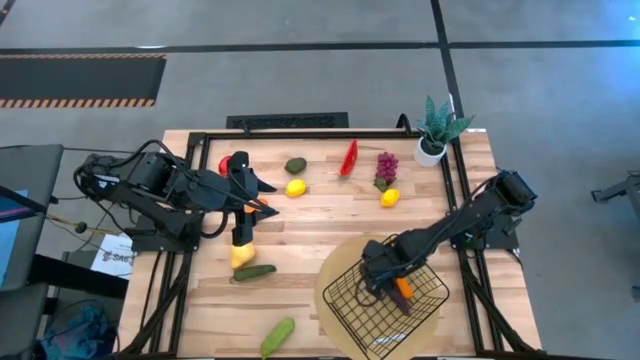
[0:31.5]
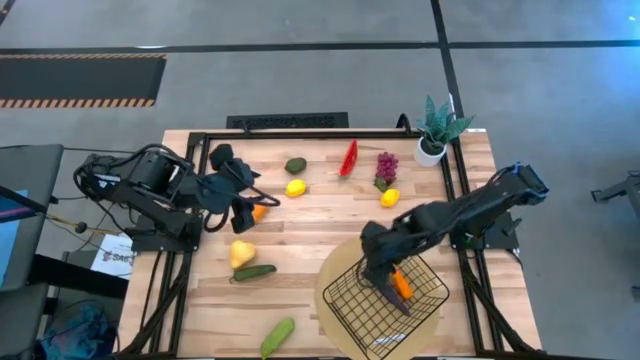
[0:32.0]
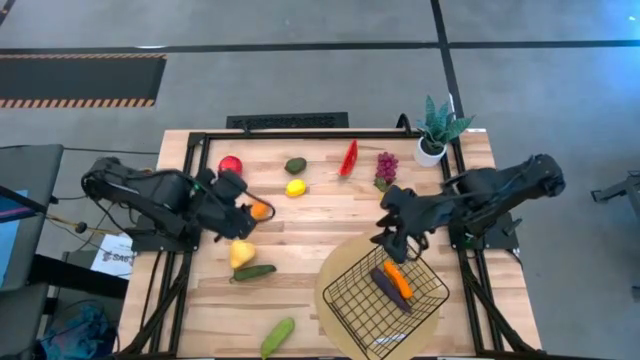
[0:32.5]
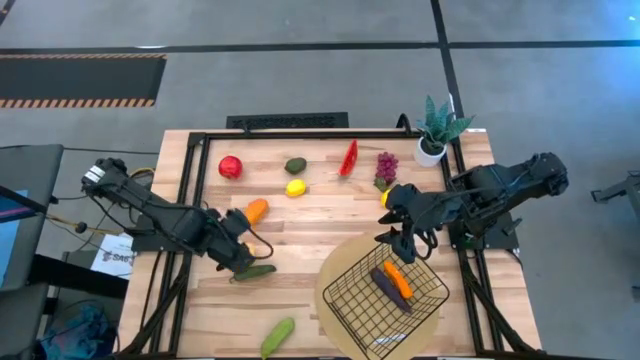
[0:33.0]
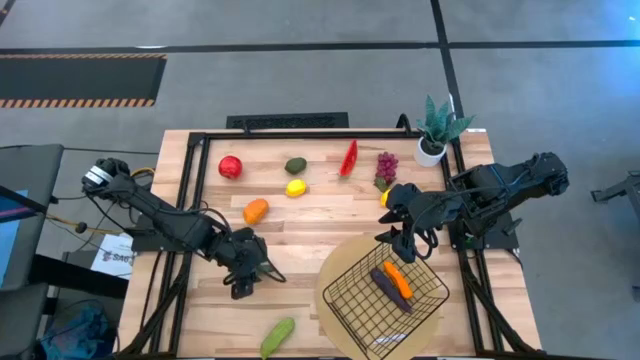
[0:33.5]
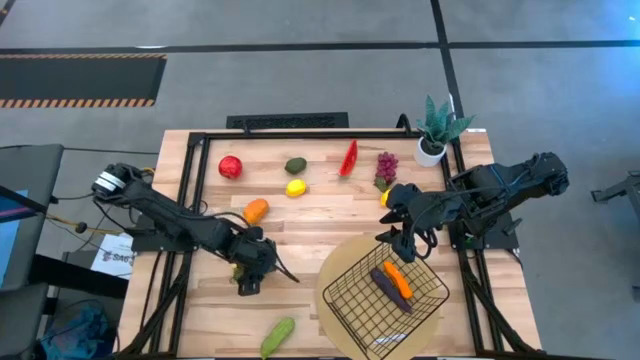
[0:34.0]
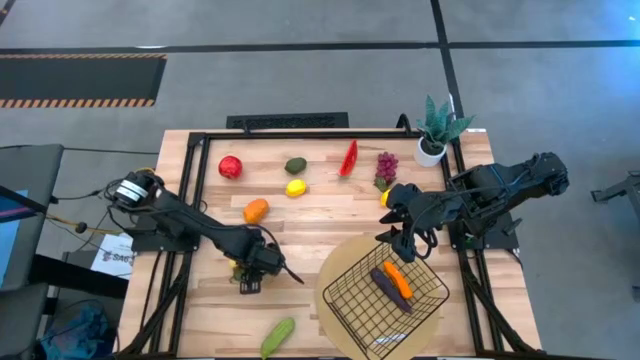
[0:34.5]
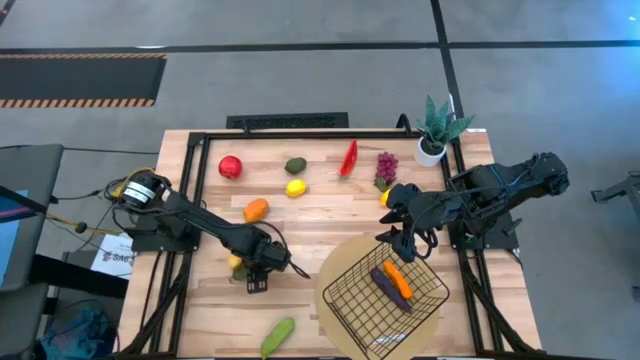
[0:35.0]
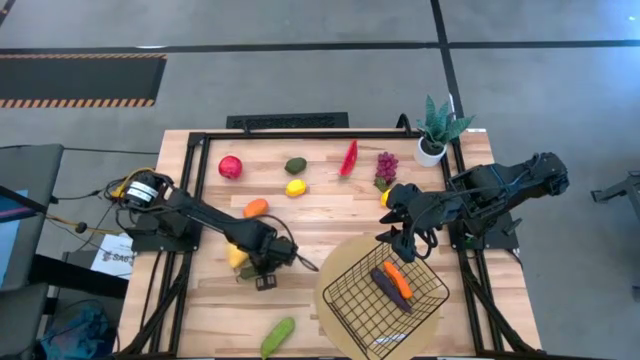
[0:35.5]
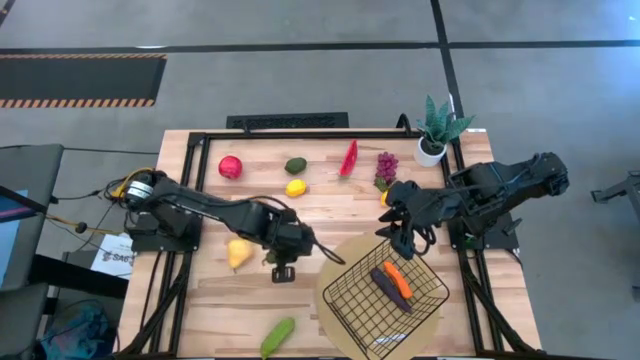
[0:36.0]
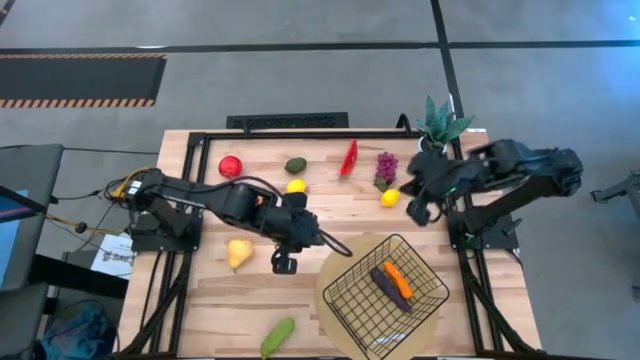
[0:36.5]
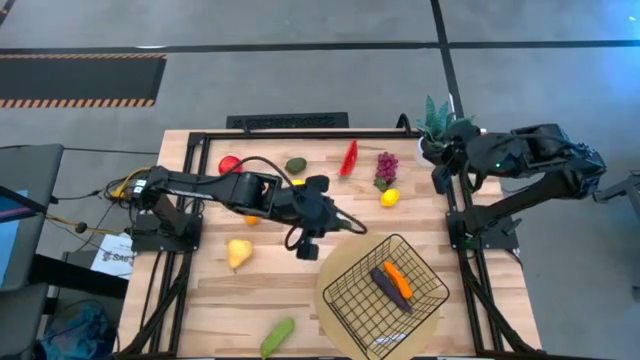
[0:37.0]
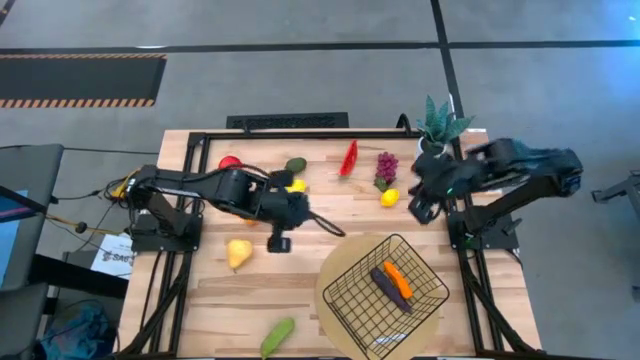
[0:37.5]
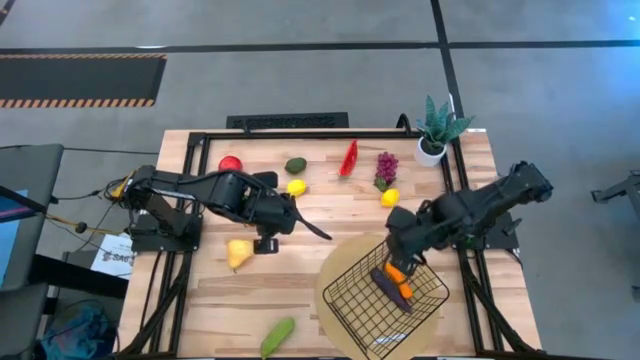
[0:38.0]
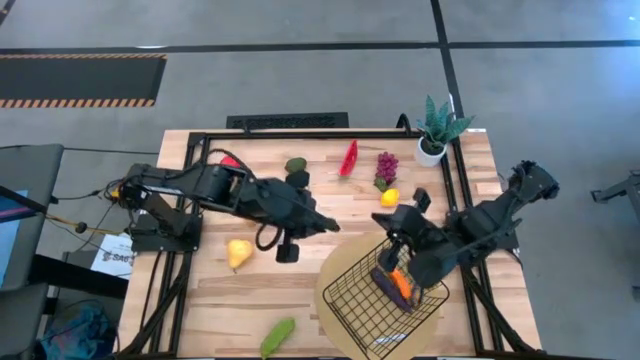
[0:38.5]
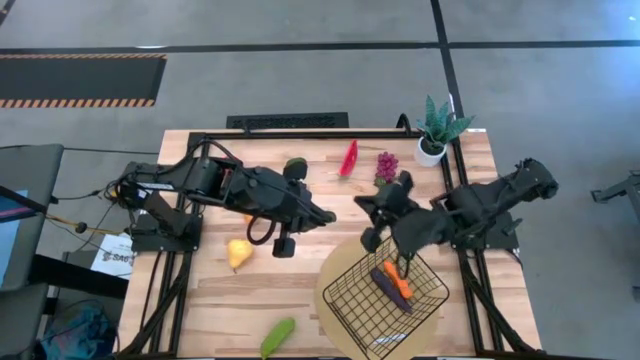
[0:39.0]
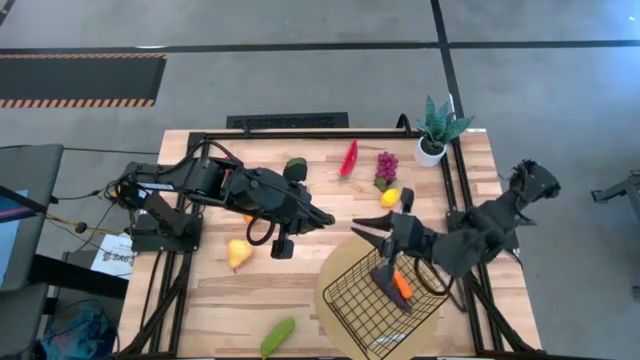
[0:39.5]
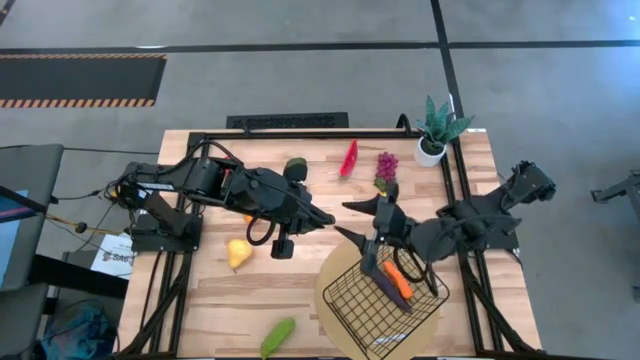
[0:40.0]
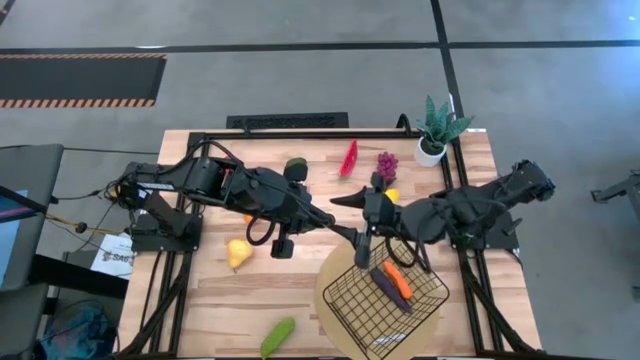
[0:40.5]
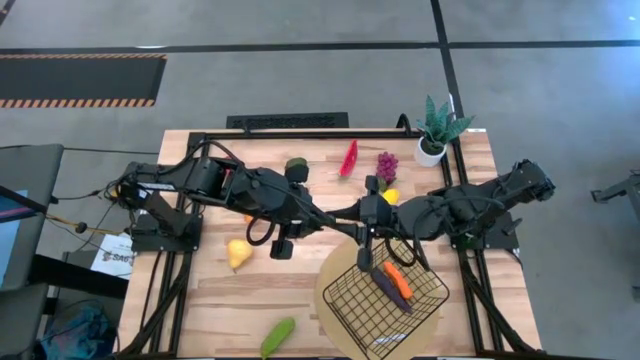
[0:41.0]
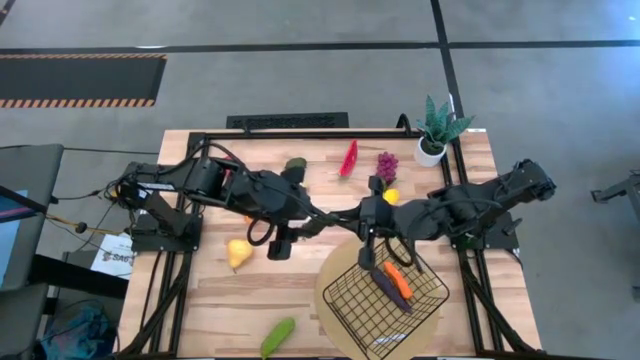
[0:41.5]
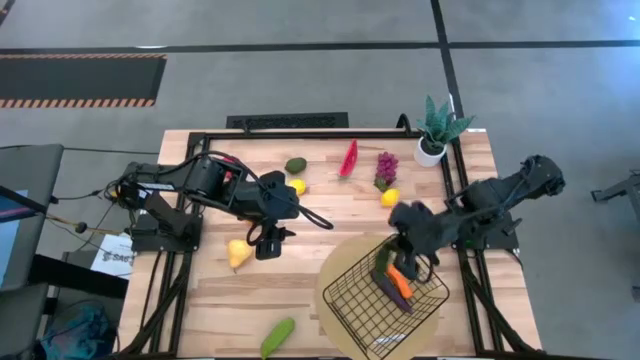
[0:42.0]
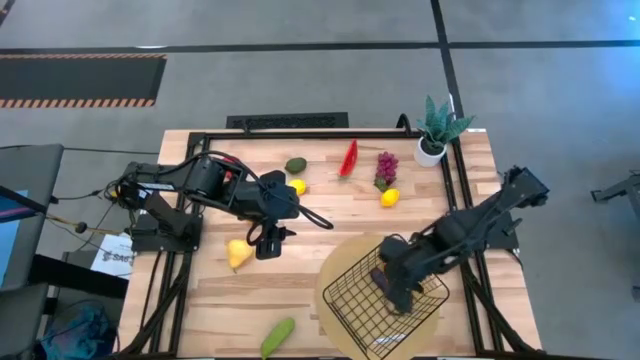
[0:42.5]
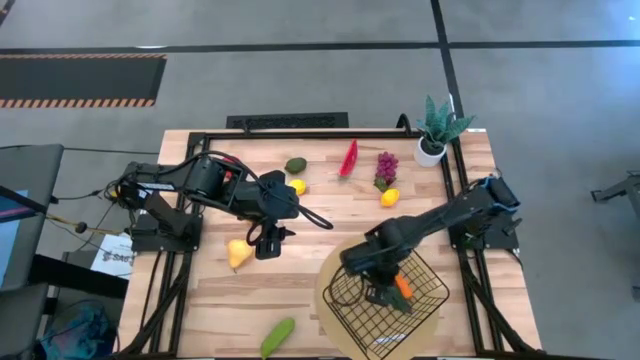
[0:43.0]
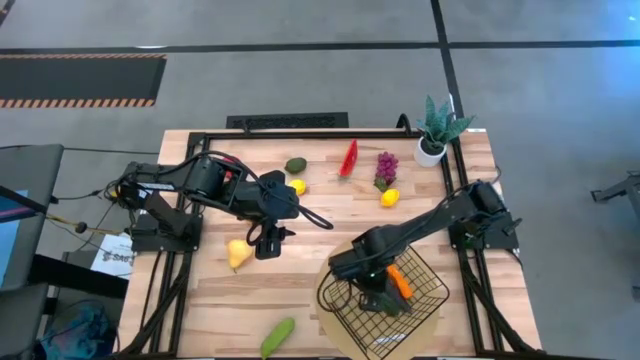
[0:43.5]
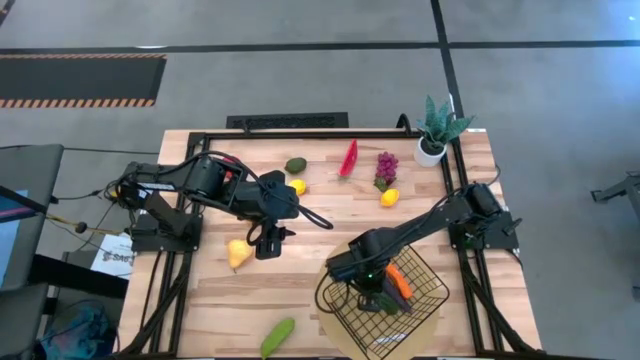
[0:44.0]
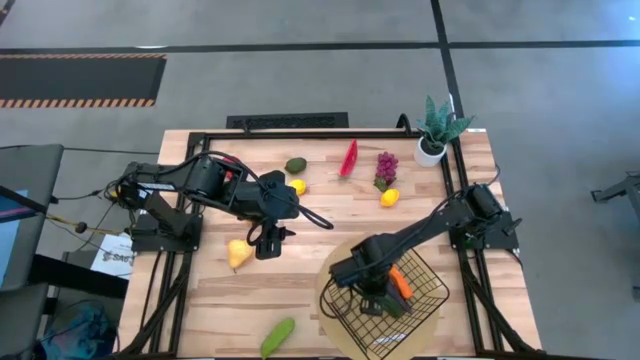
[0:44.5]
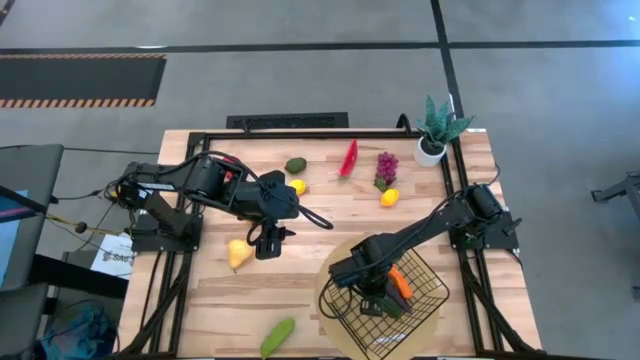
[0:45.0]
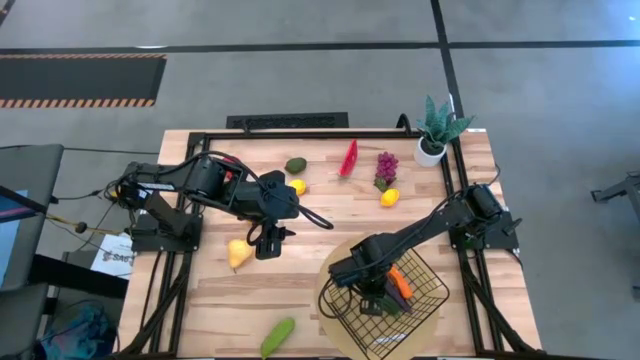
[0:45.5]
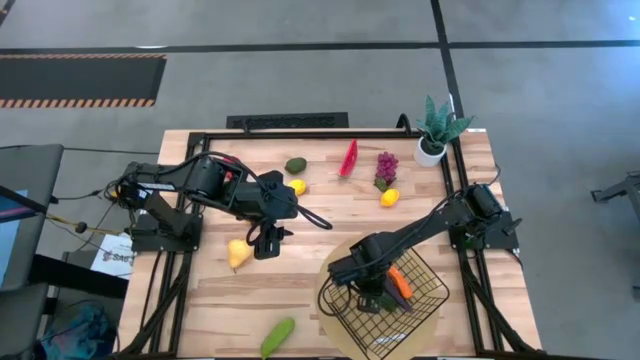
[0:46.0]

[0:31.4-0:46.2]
Task: Build produce basket
Put the green chili pepper into the mesh basket
